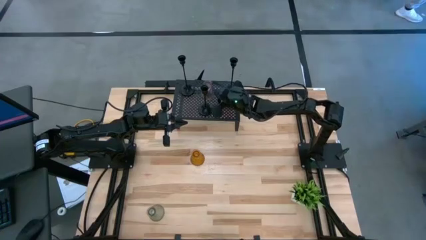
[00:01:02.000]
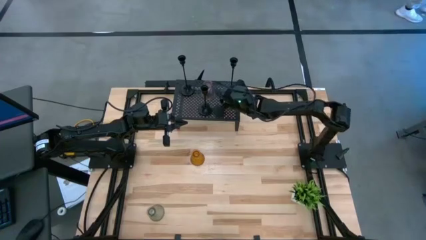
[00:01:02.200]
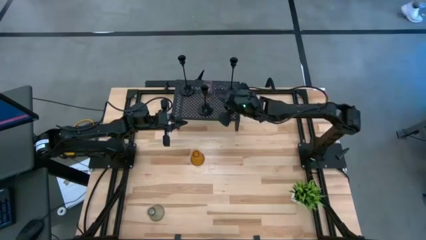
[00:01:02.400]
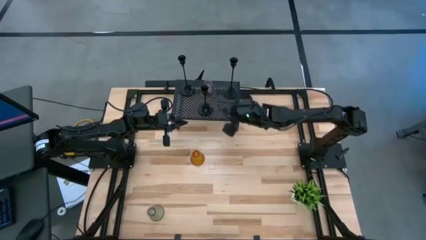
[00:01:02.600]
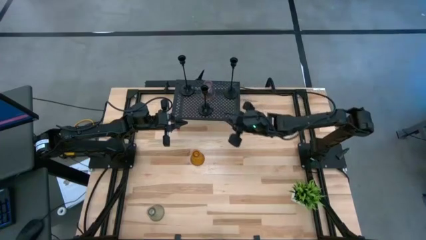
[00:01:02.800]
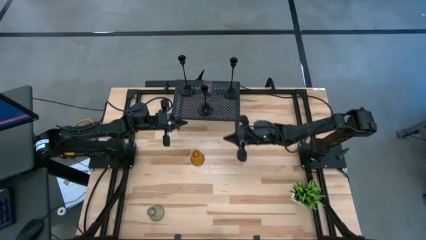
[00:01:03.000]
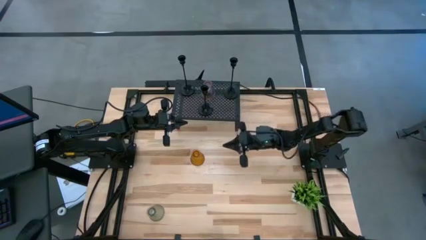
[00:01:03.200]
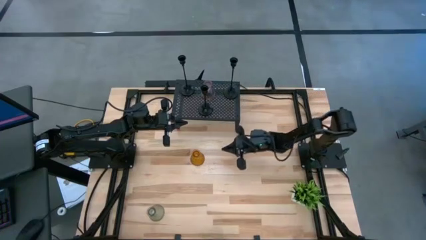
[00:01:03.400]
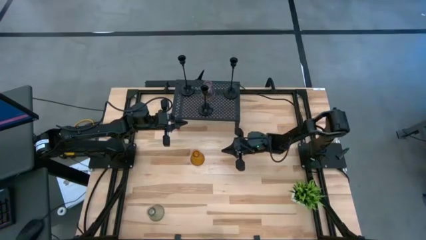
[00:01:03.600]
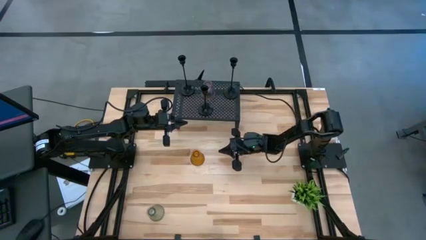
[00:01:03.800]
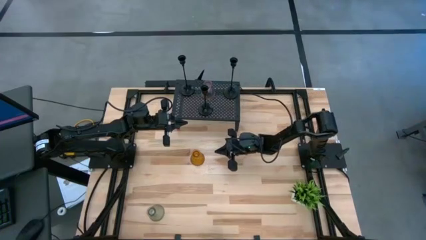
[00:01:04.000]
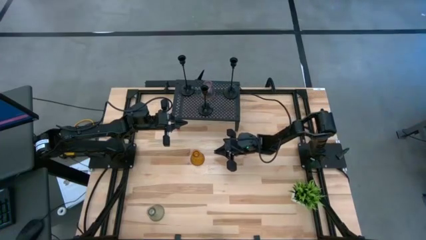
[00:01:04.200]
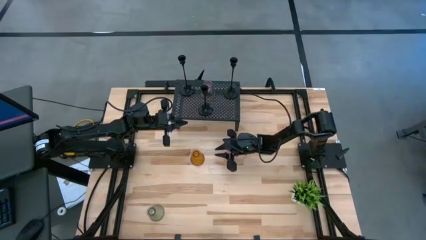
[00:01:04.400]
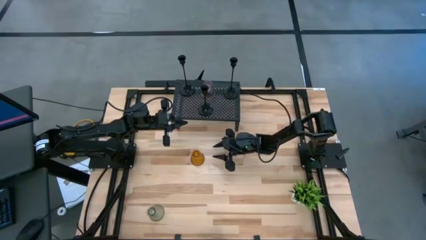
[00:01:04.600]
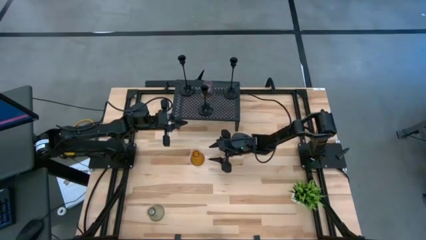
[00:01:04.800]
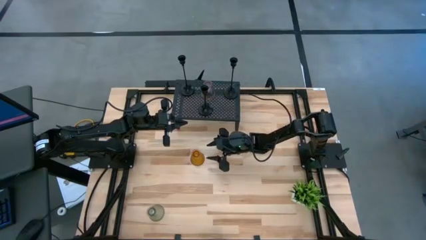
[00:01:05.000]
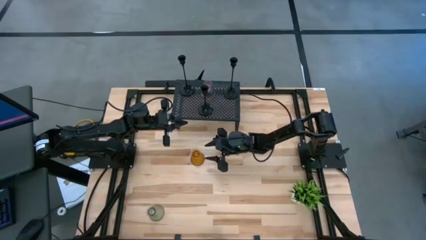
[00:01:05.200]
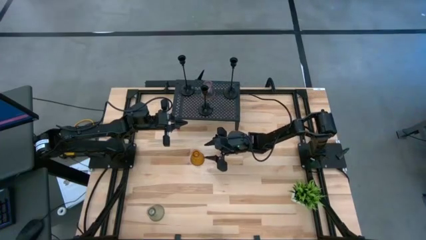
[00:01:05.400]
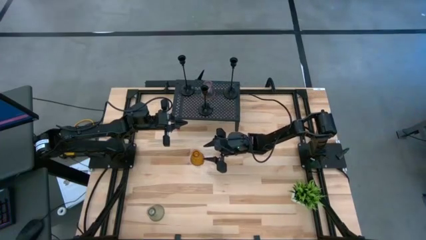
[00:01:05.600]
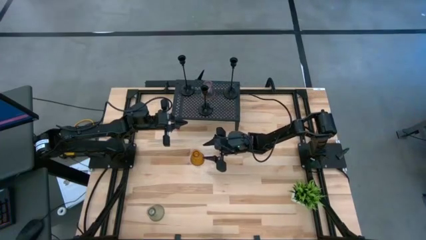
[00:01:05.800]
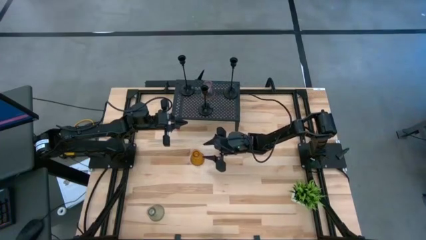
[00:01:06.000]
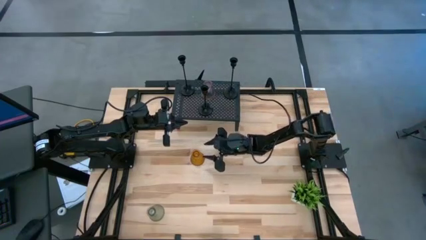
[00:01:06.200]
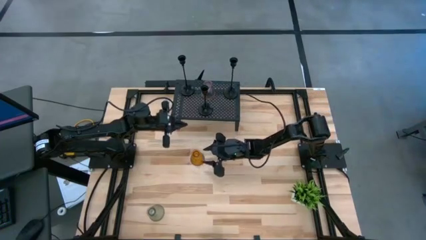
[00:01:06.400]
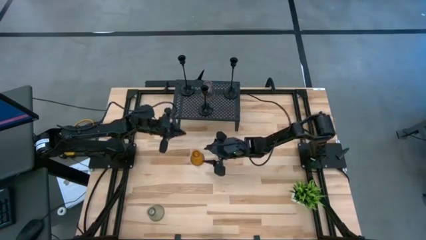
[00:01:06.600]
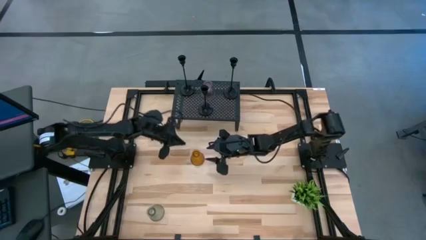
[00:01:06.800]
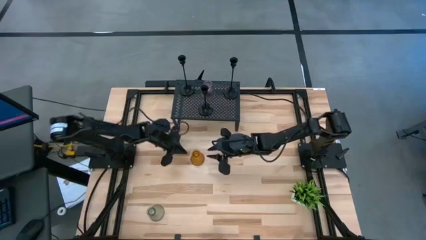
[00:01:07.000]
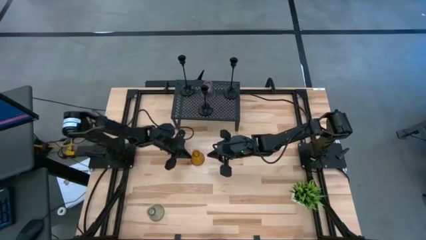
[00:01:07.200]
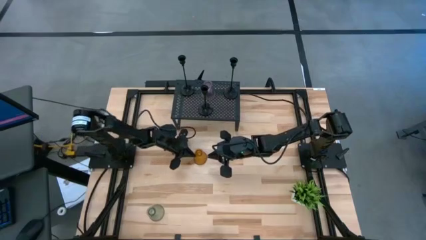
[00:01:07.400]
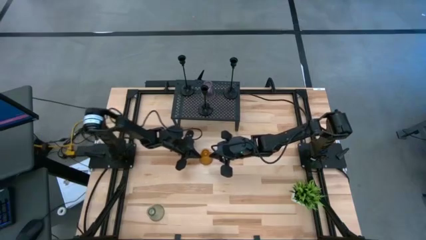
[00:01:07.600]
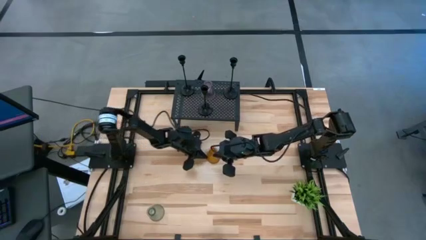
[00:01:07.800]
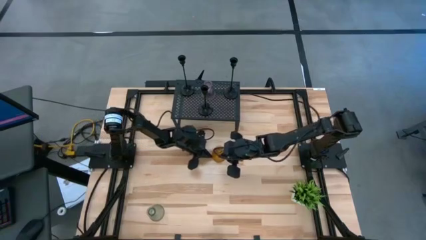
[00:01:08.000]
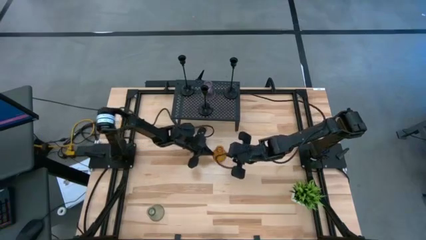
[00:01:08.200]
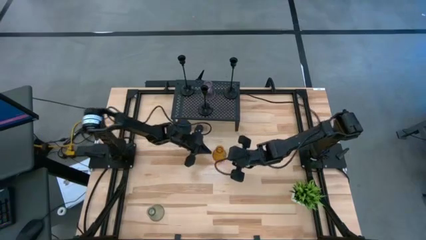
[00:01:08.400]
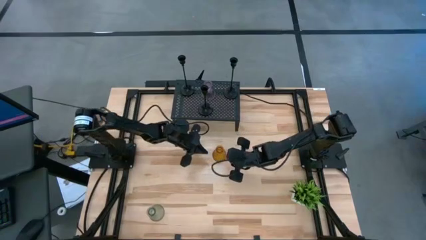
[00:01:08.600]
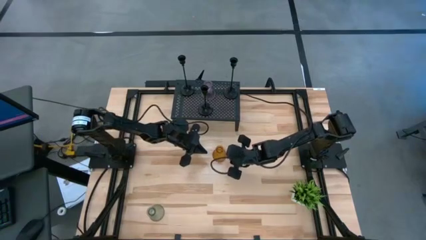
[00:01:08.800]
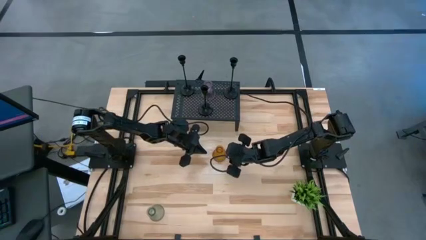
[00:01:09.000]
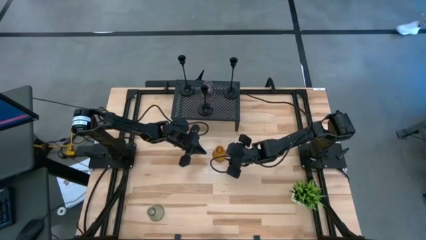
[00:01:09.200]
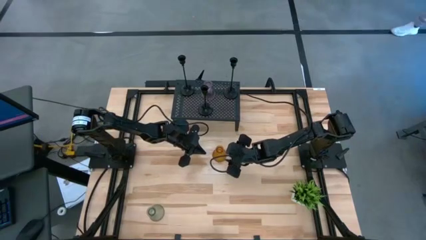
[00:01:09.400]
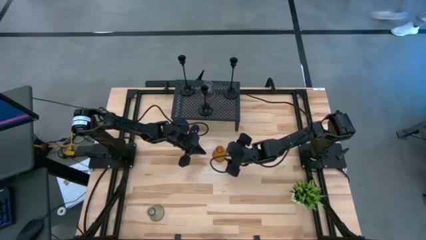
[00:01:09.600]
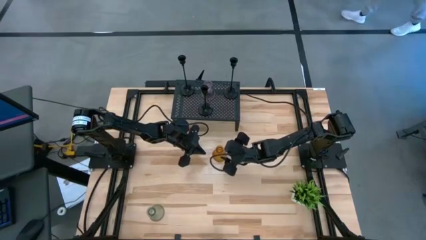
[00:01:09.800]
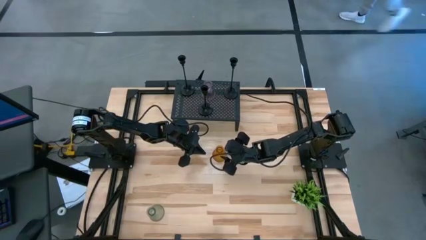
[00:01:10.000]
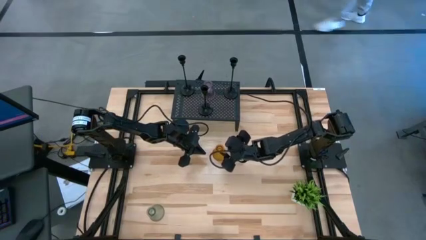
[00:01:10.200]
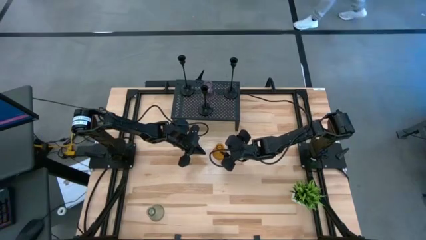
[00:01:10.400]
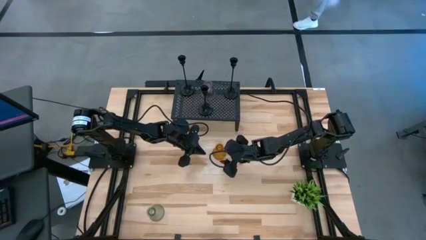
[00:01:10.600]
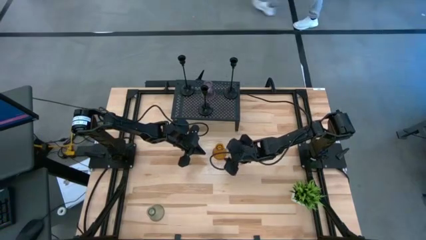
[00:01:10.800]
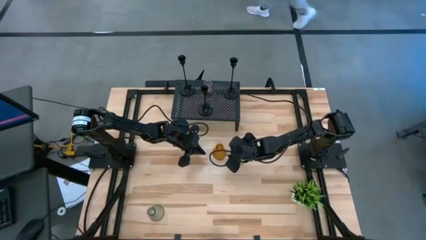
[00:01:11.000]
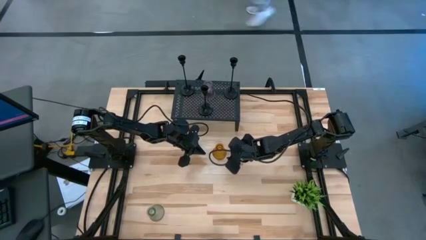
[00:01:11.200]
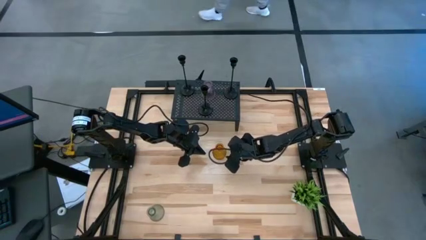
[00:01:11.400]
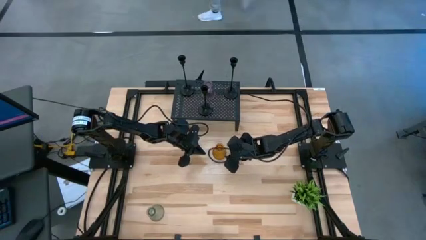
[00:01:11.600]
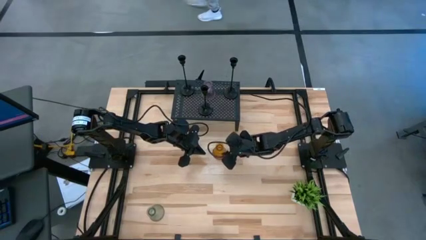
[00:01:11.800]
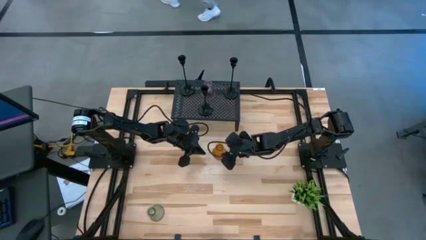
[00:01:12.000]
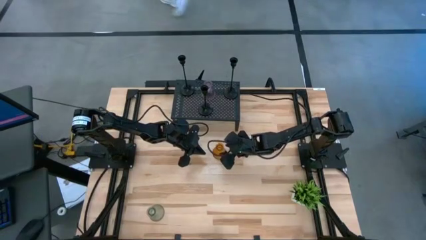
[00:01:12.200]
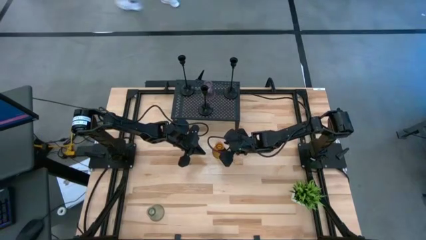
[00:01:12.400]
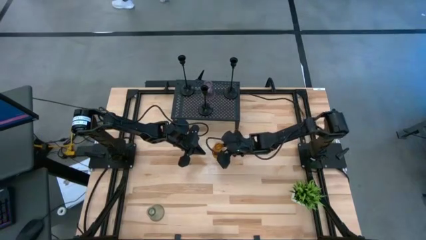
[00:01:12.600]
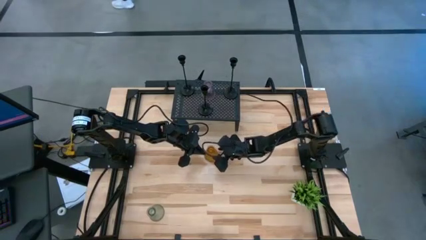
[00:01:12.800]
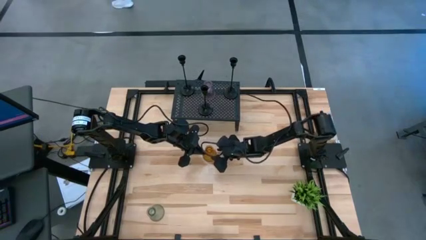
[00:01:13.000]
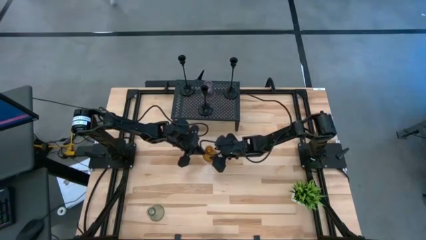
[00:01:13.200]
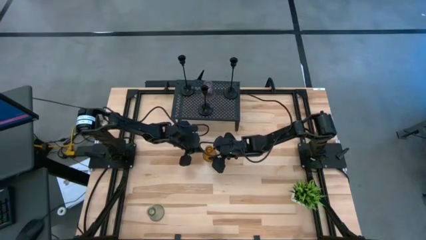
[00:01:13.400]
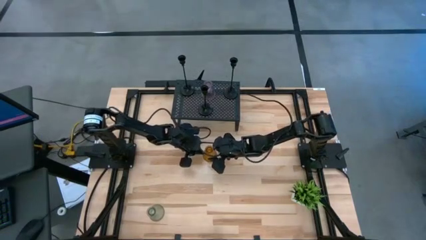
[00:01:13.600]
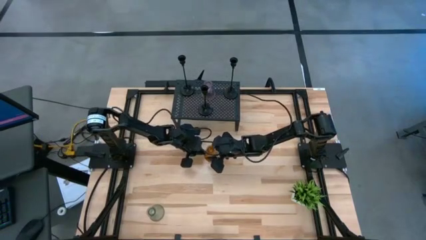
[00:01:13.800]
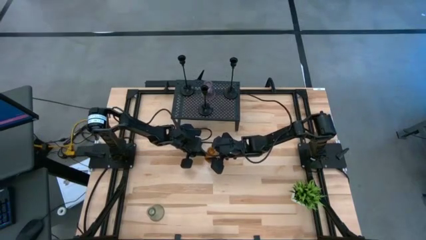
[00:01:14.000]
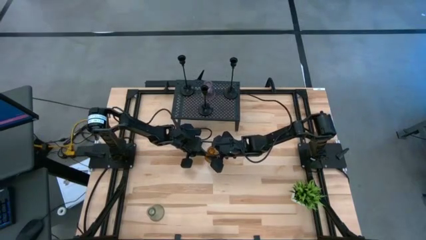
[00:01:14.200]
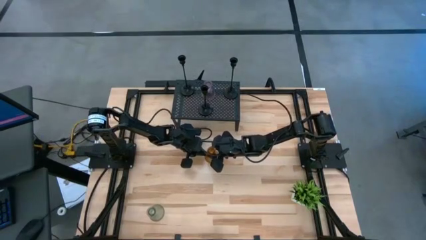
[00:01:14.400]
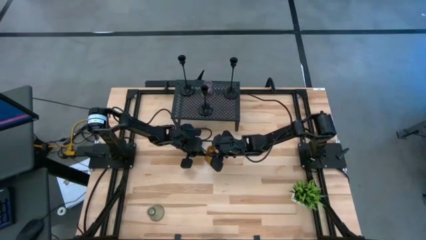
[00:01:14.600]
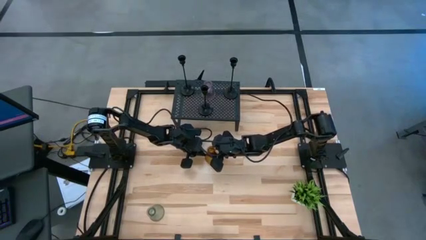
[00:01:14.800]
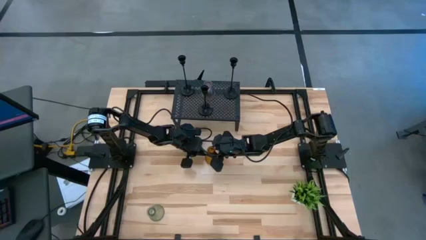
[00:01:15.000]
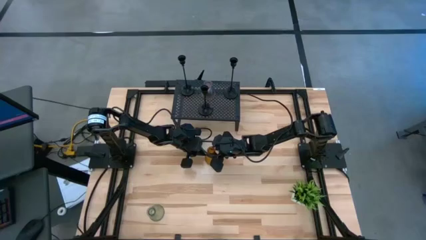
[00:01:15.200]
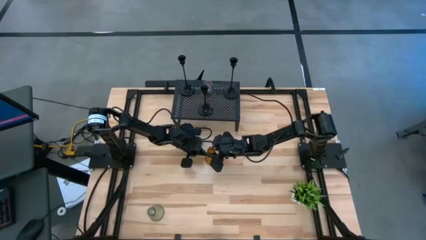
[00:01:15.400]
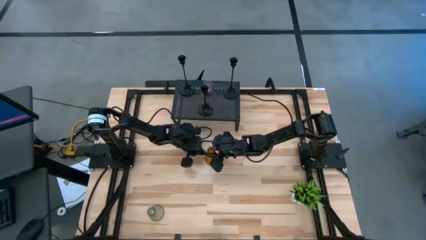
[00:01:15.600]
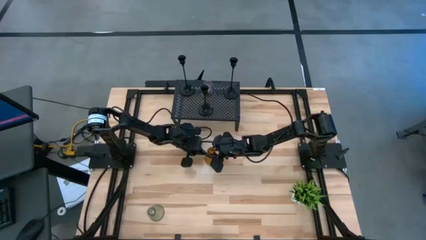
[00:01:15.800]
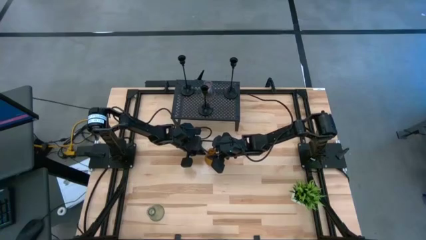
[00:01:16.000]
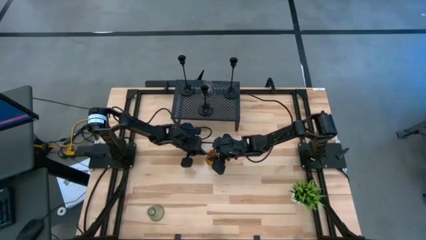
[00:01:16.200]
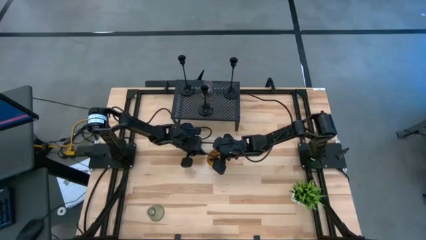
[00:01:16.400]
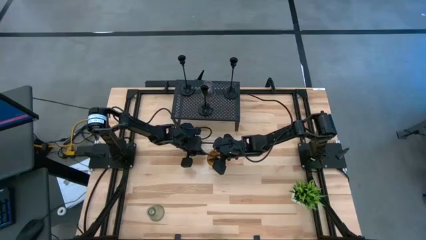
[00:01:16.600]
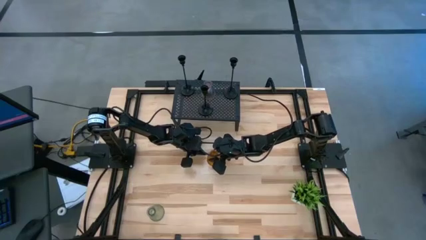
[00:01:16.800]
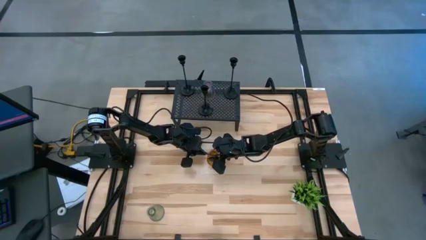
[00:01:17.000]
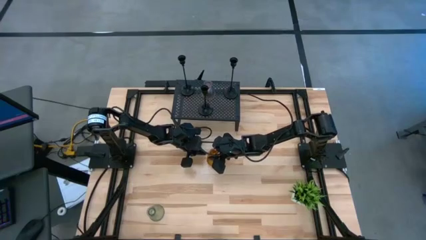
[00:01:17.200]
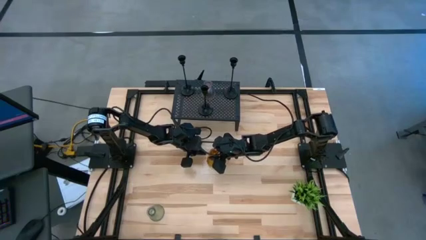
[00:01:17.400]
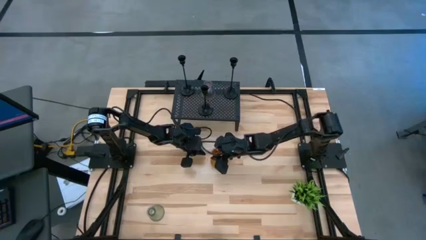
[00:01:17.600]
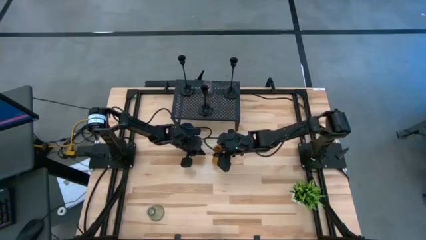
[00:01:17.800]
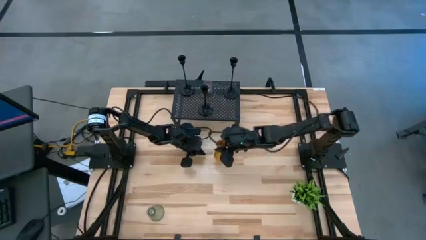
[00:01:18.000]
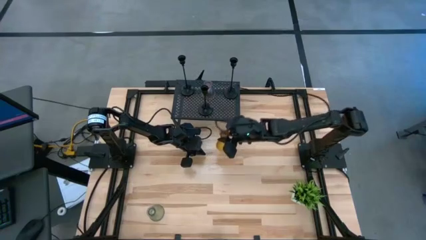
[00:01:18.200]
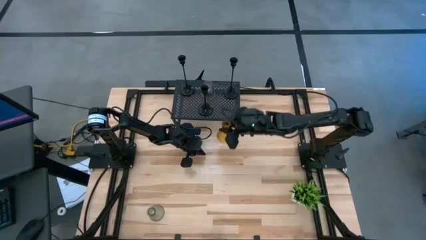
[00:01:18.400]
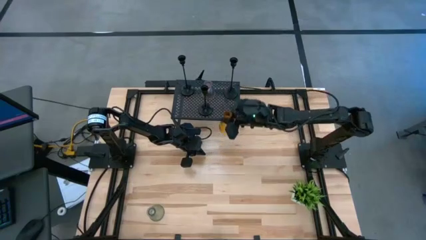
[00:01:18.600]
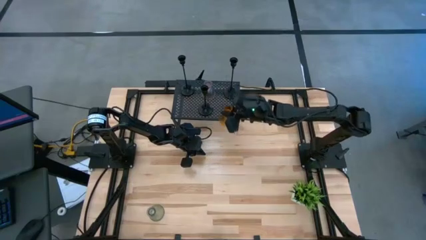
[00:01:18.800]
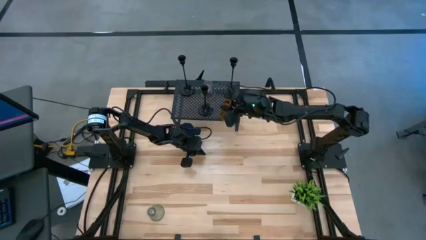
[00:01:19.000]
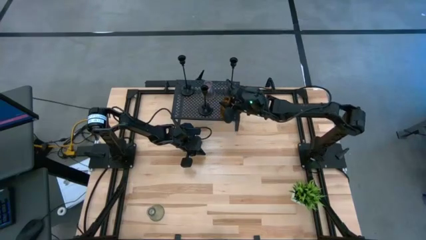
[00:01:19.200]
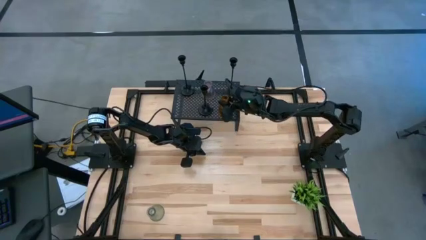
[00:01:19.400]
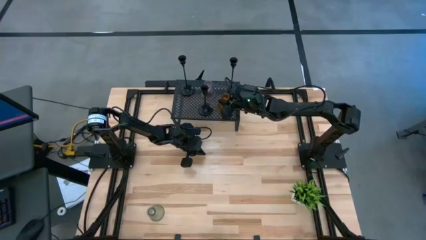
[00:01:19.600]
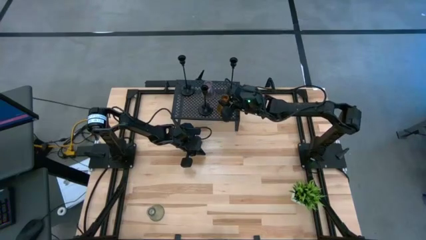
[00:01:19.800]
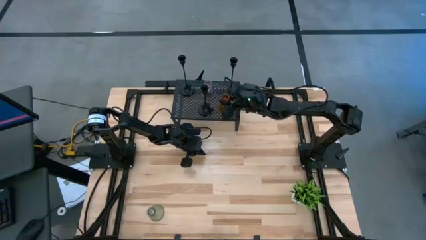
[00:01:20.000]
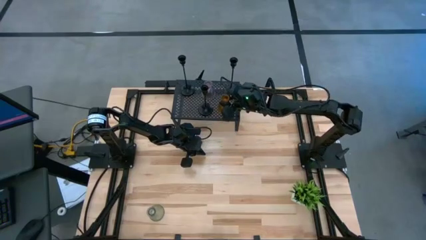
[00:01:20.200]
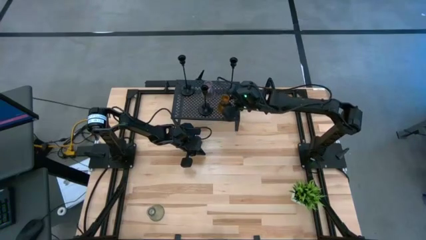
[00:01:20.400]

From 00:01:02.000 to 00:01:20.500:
Task: Pick & Place candle stick holders
Put the orange glass candle holder on the shelf
